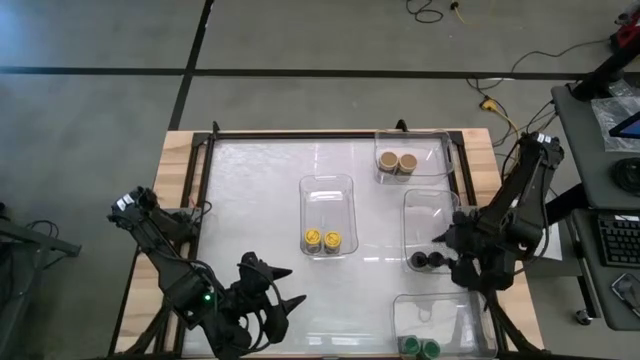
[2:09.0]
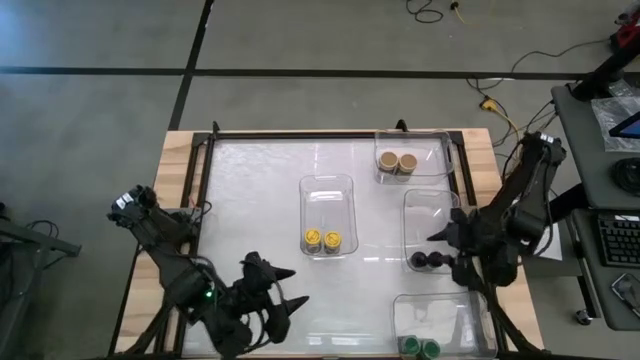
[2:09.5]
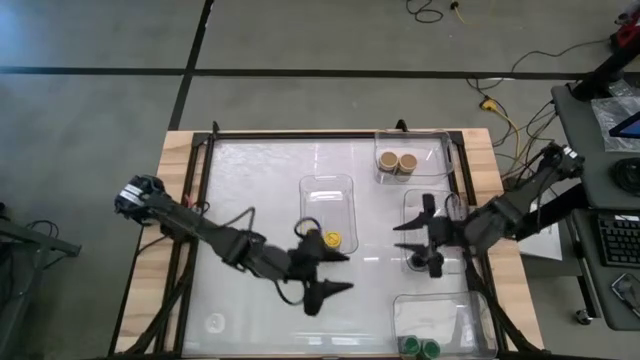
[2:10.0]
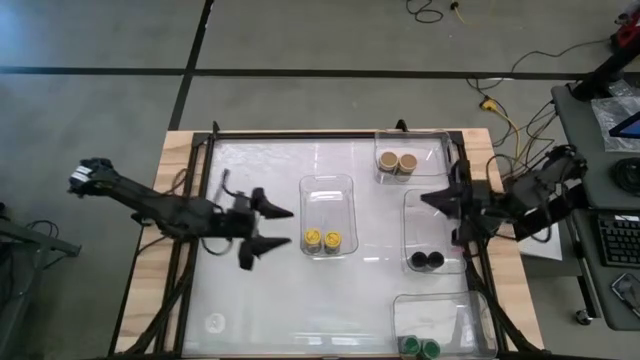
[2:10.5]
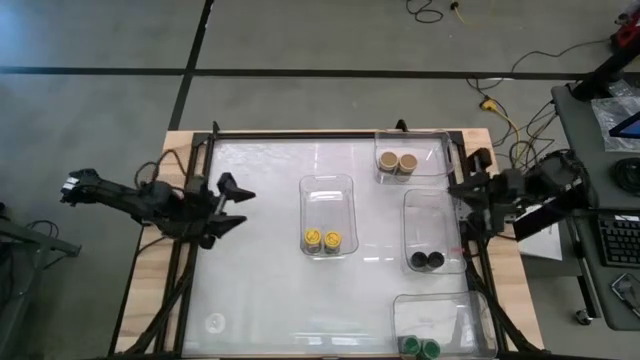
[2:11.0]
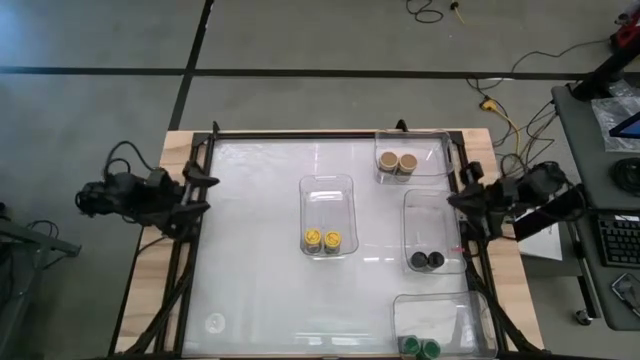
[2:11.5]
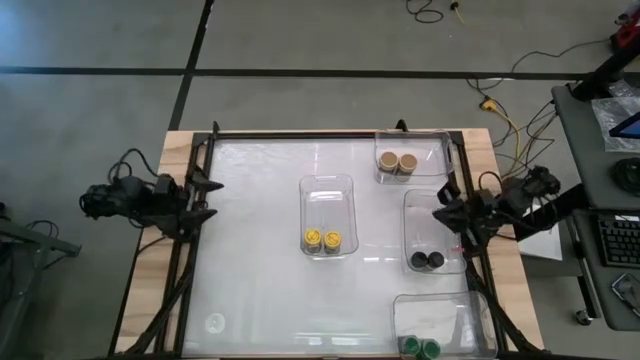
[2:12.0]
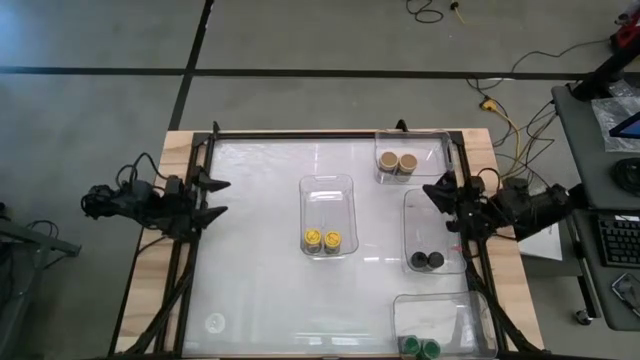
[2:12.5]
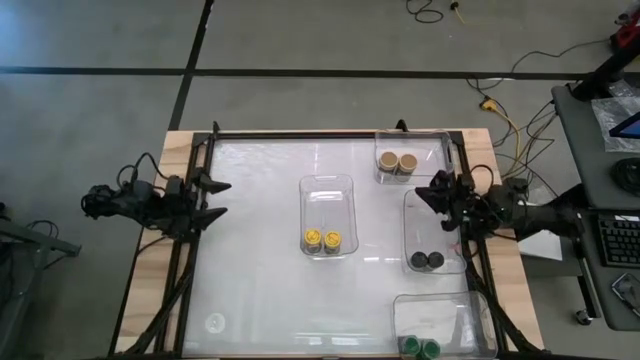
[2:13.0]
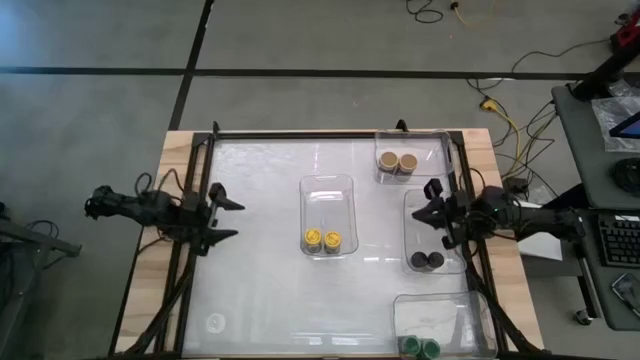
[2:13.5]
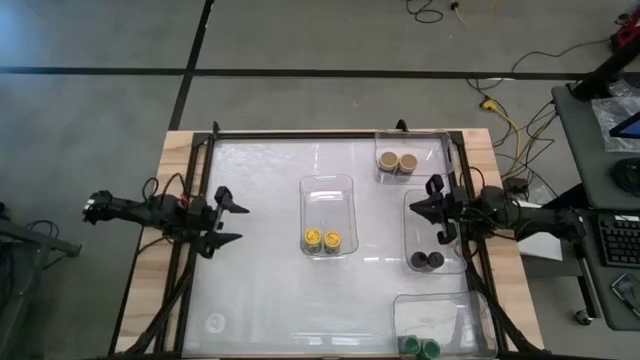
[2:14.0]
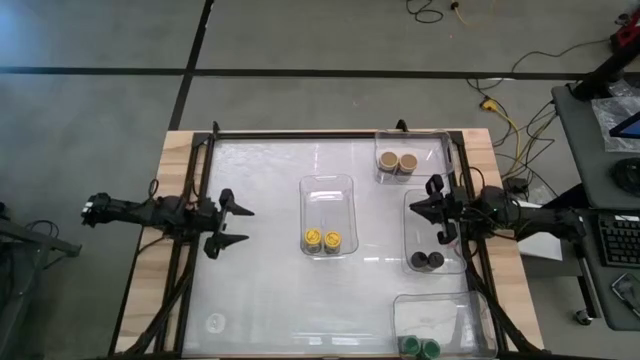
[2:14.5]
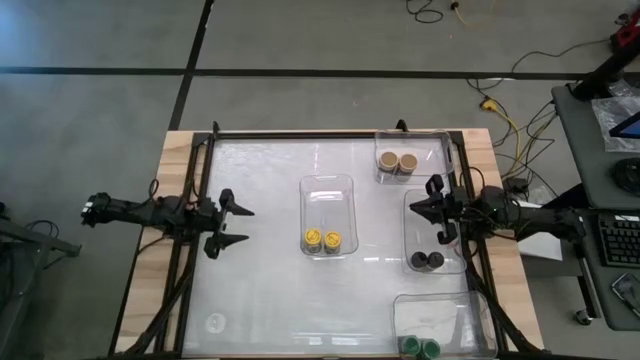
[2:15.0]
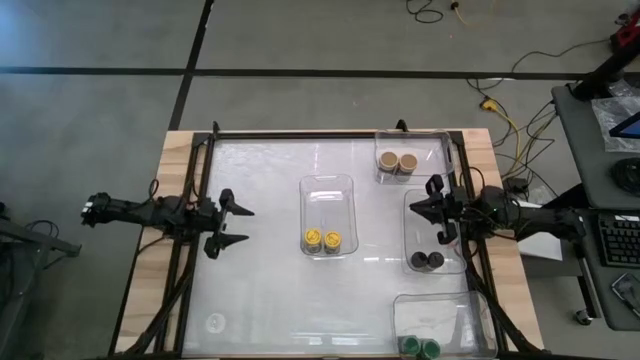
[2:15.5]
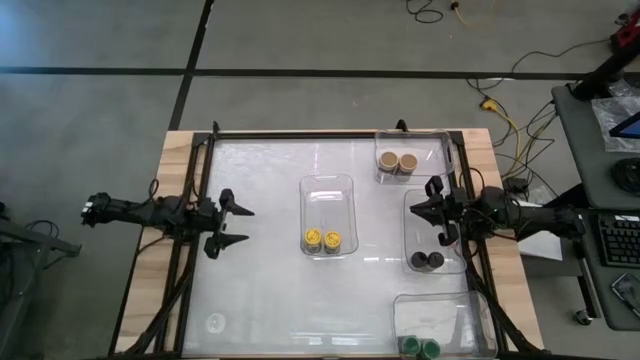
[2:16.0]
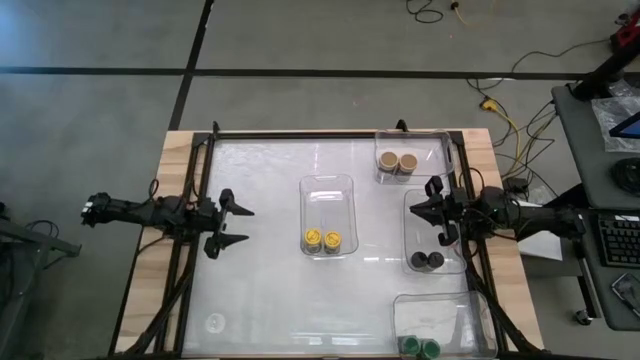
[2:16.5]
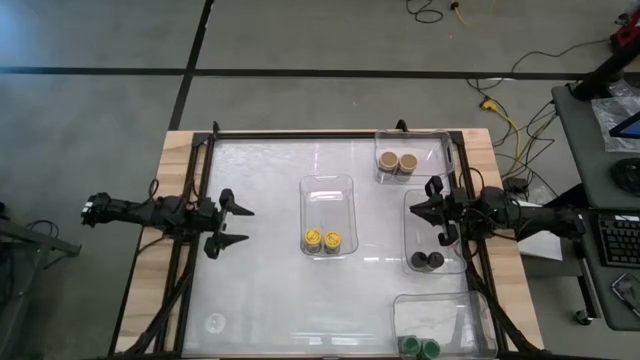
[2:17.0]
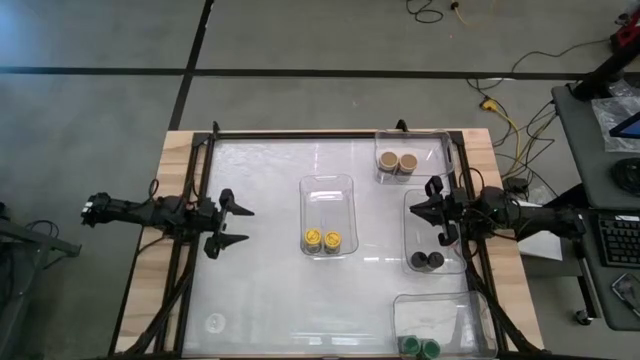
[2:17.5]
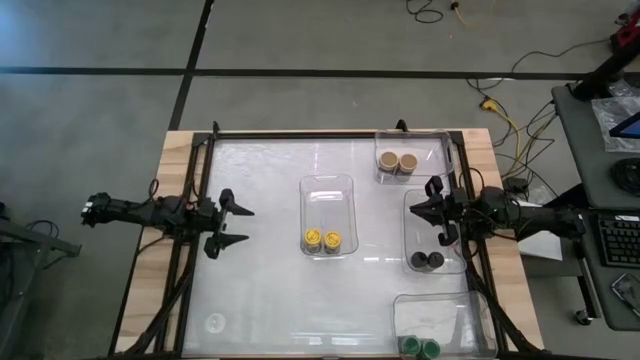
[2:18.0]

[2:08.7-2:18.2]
Task: Sort spices by type
Return to Home Position
